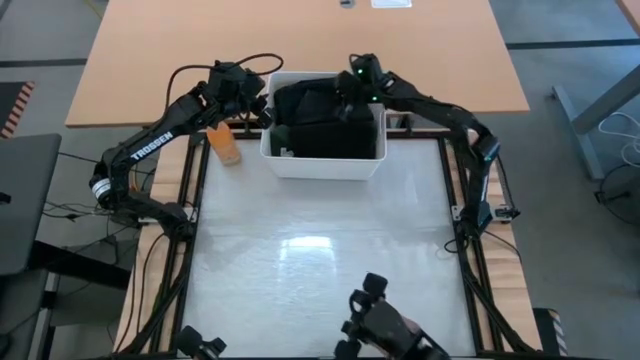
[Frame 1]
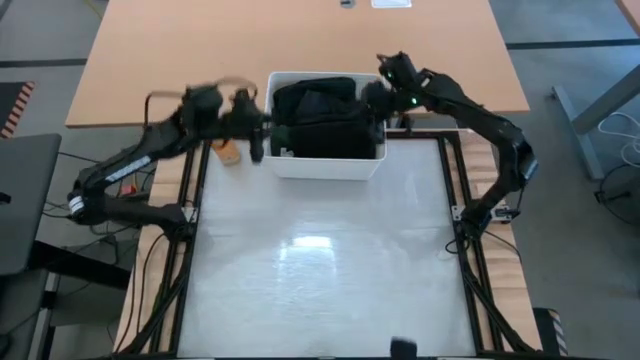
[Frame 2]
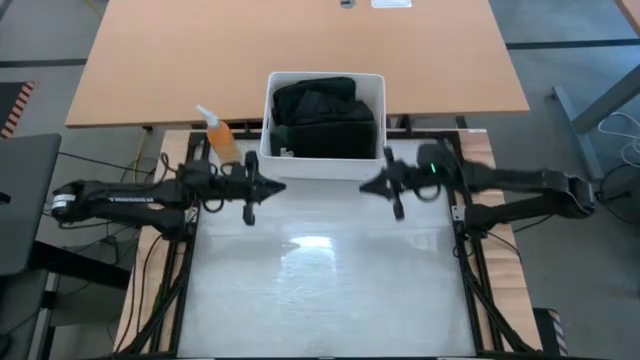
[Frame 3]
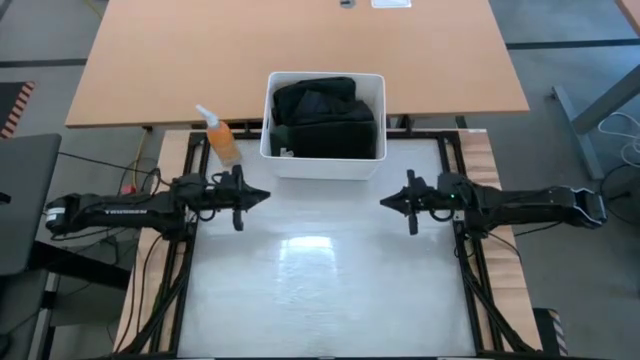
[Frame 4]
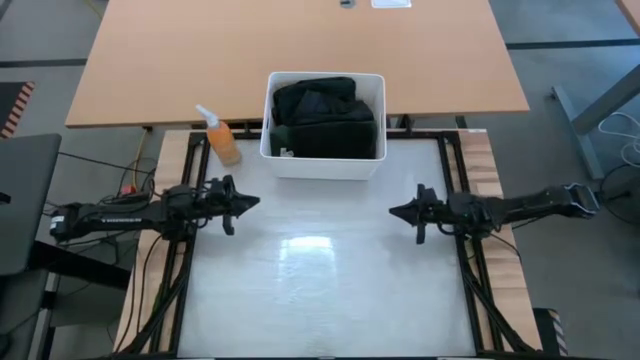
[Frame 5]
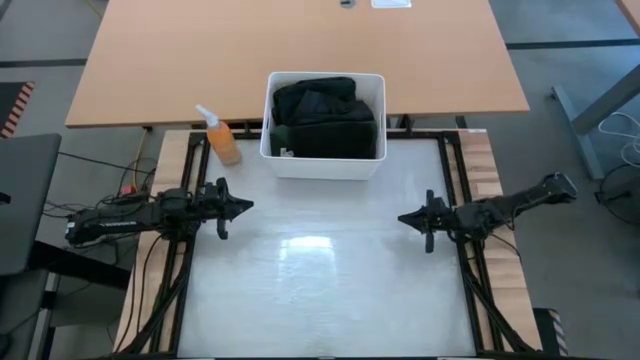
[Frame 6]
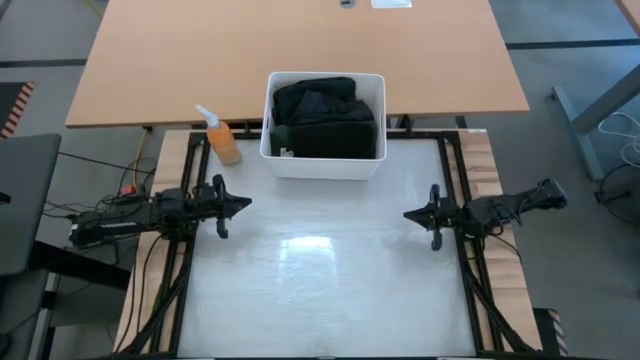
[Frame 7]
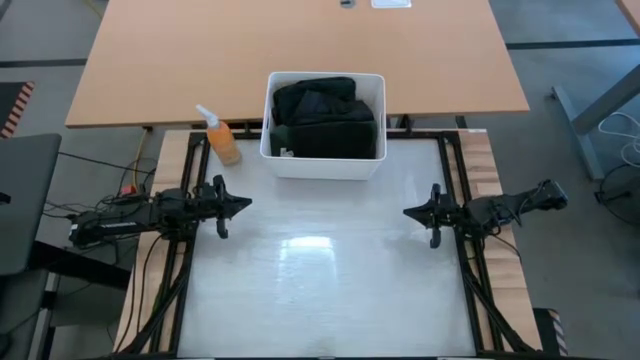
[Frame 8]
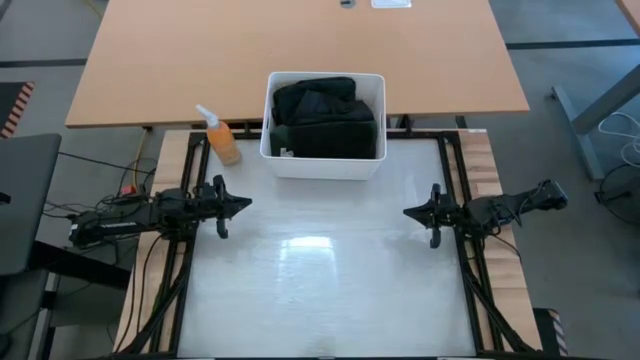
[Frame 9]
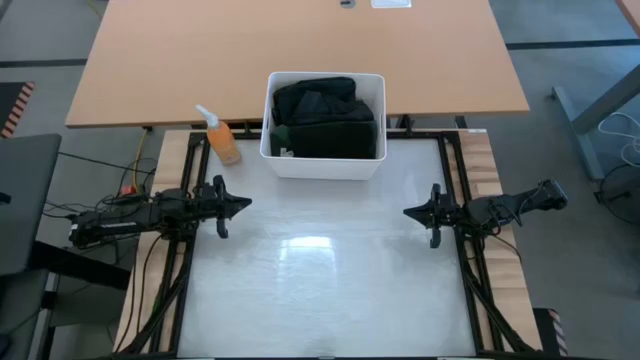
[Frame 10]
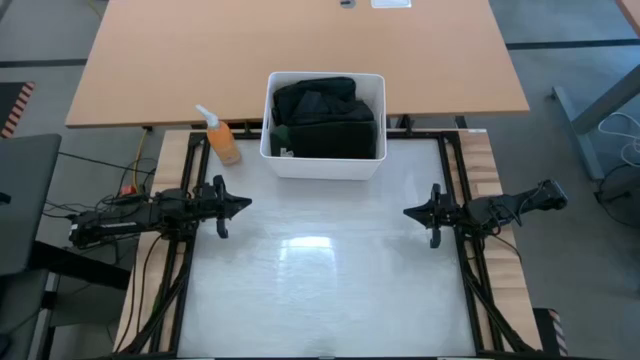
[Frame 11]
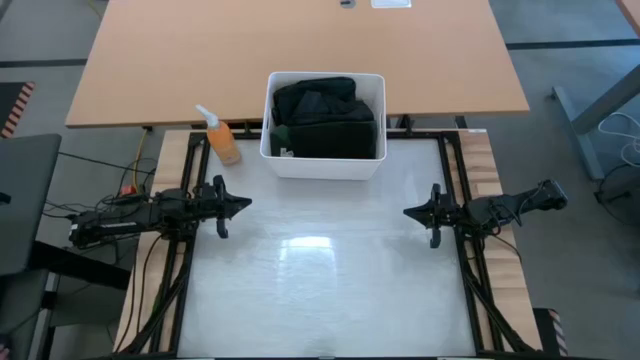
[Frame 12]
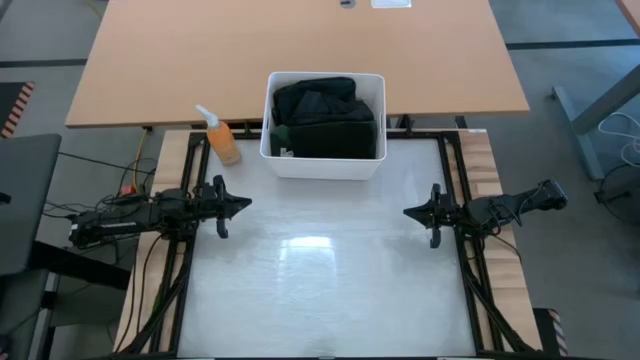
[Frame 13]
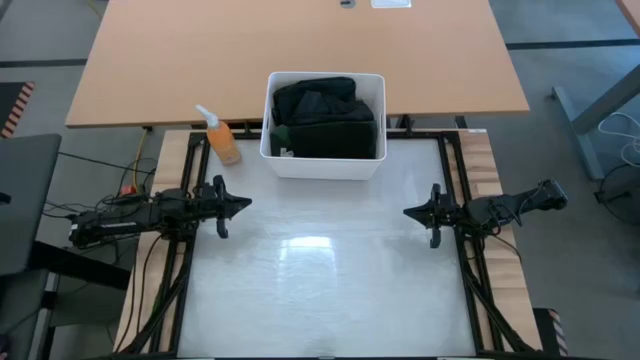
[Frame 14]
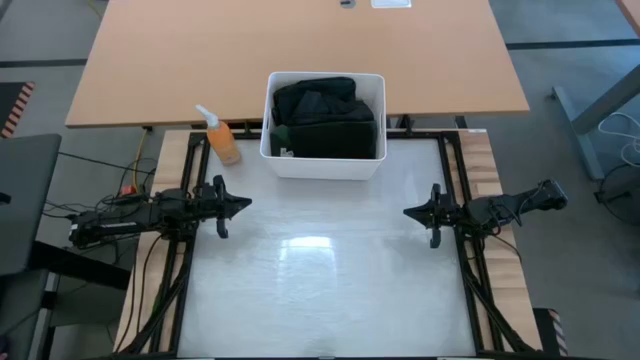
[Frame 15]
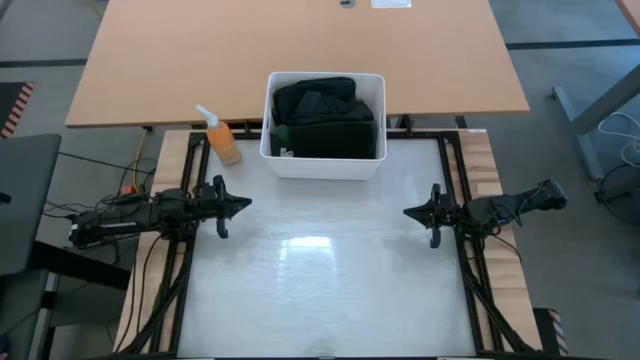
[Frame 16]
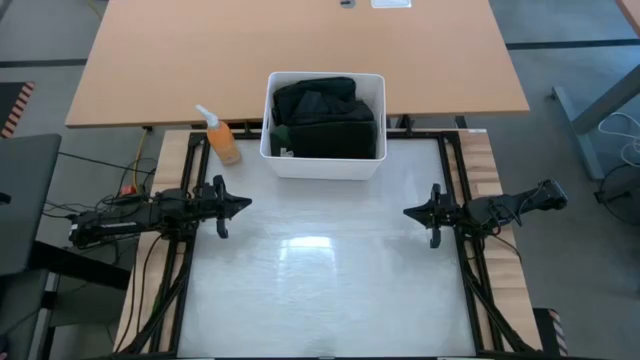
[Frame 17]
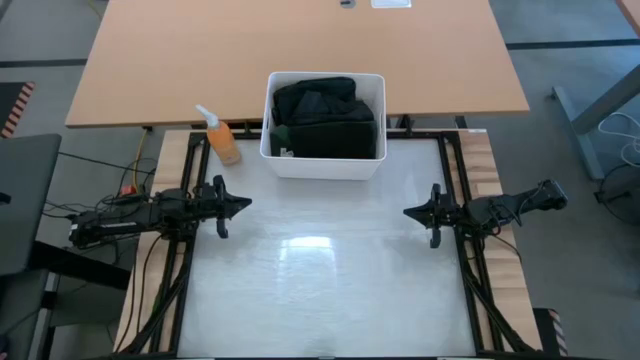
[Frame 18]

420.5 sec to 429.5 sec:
Task: Fold laundry
Return to Home Position

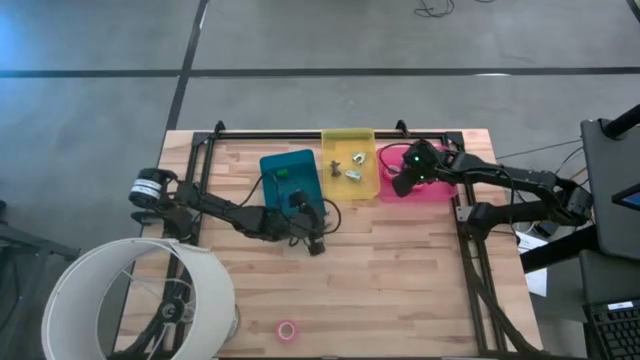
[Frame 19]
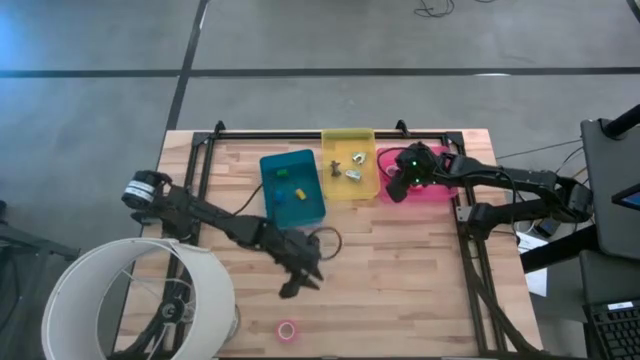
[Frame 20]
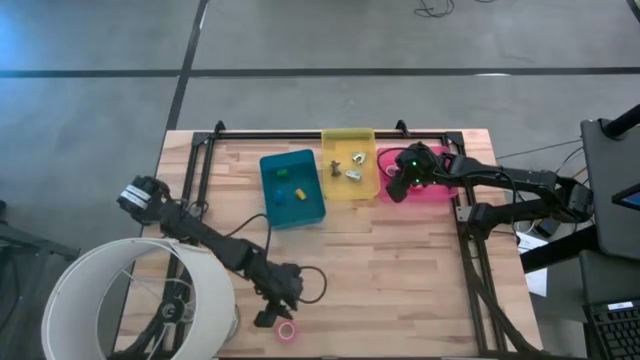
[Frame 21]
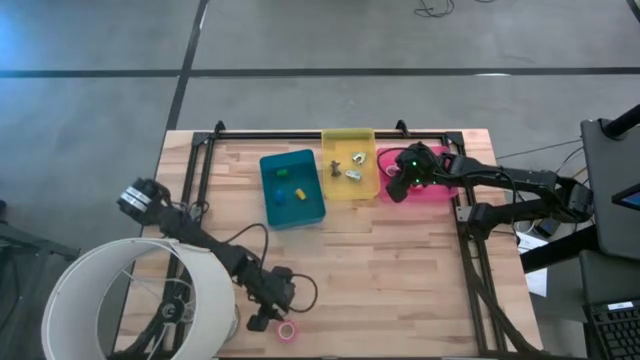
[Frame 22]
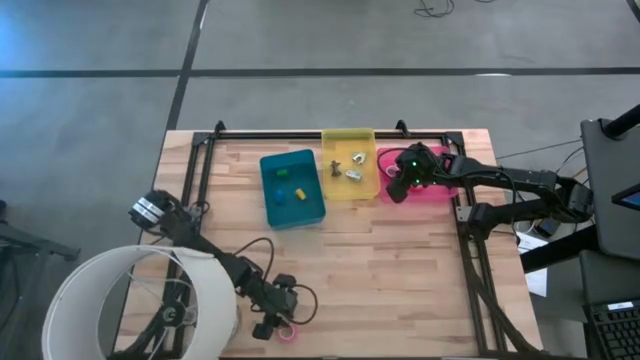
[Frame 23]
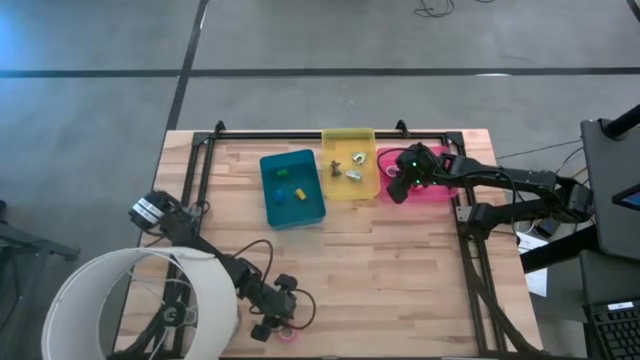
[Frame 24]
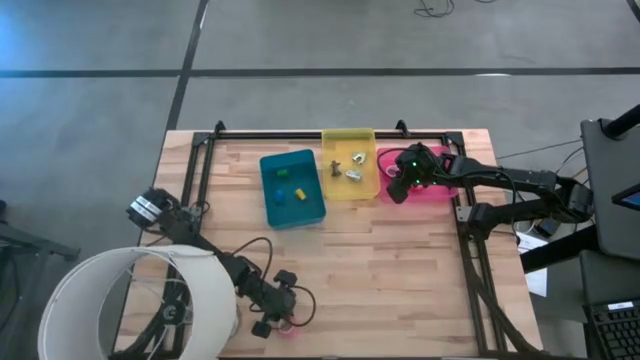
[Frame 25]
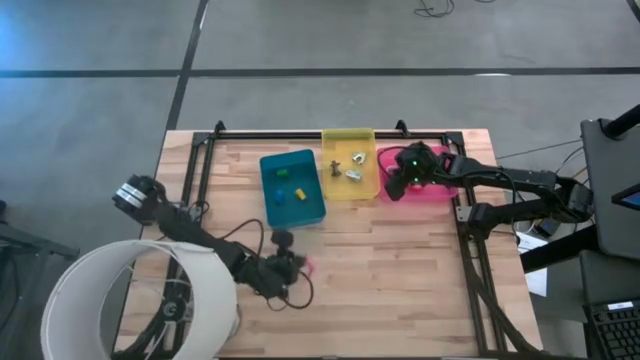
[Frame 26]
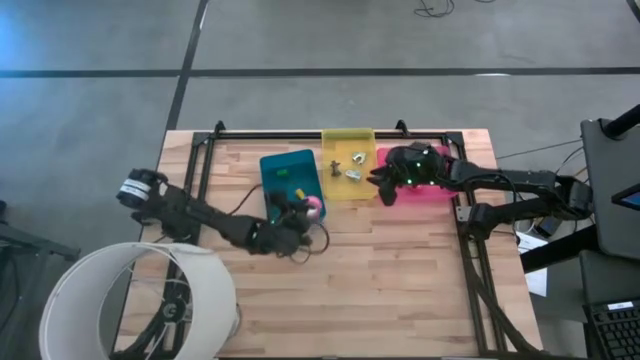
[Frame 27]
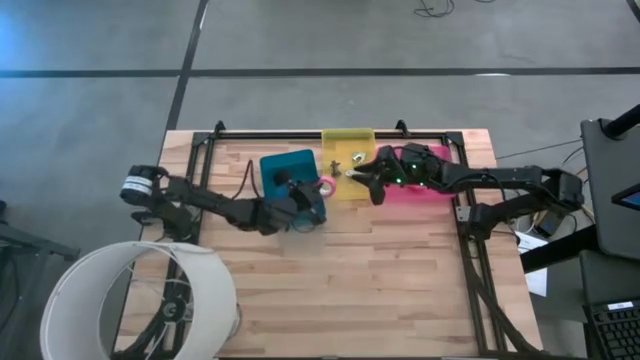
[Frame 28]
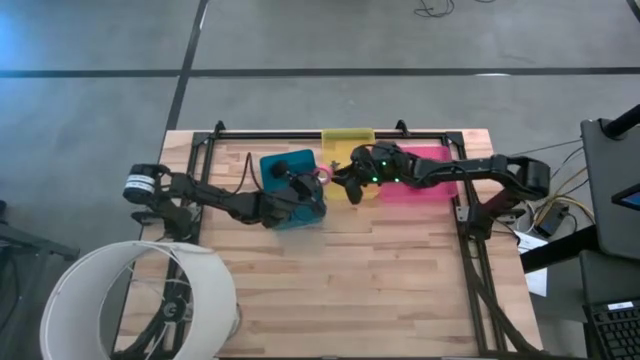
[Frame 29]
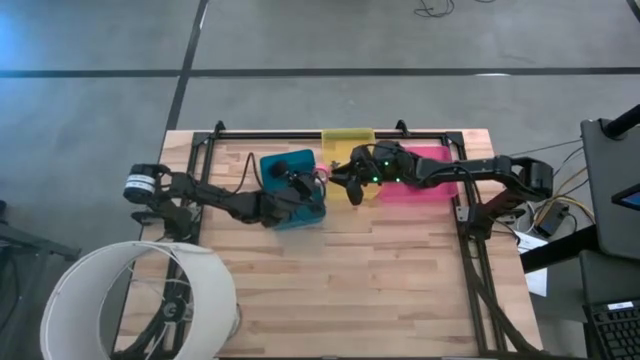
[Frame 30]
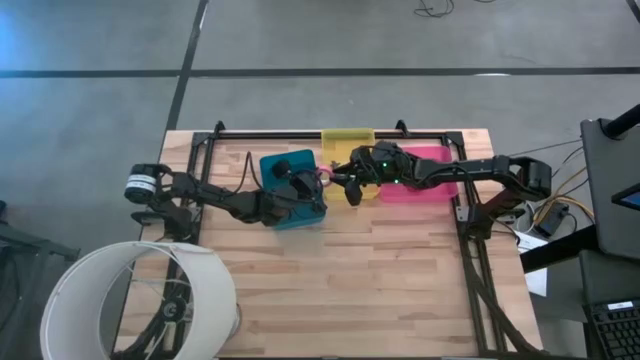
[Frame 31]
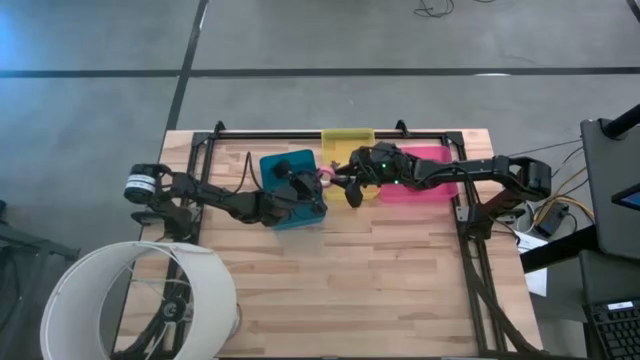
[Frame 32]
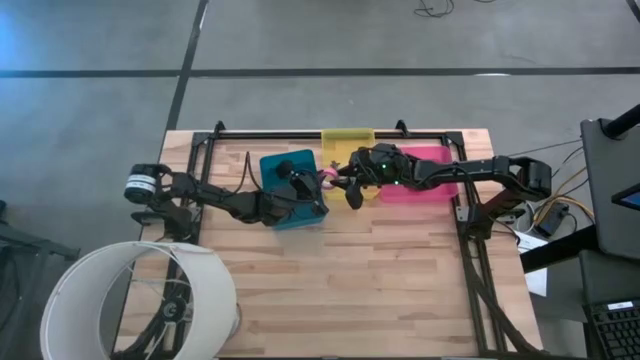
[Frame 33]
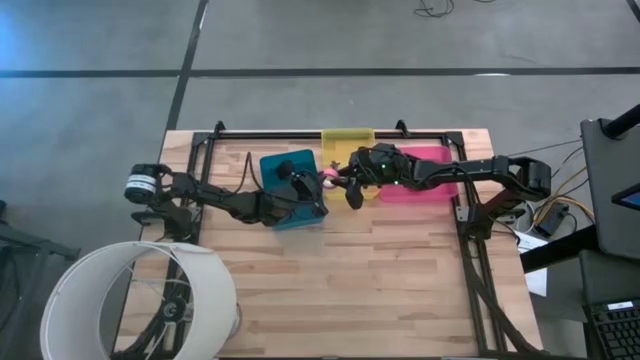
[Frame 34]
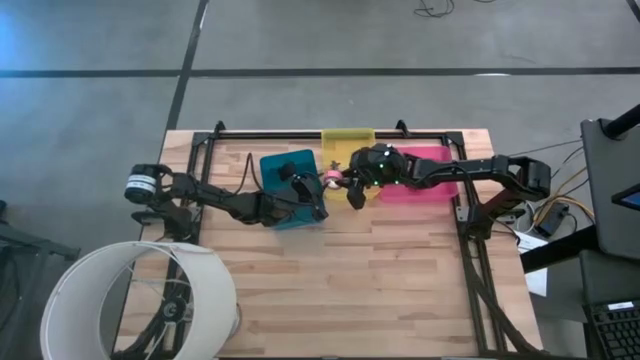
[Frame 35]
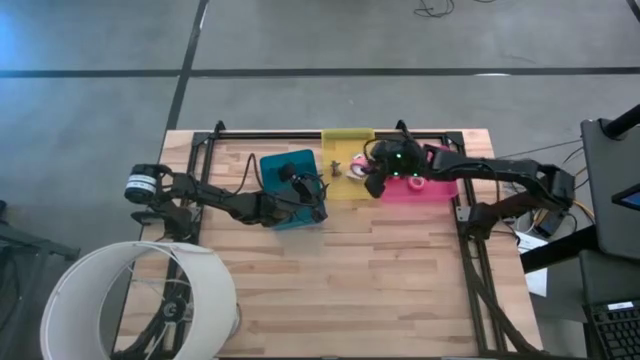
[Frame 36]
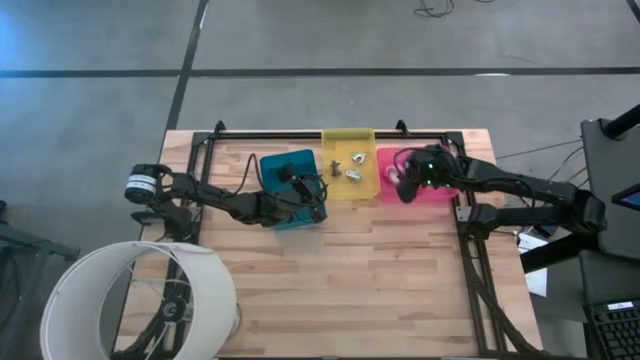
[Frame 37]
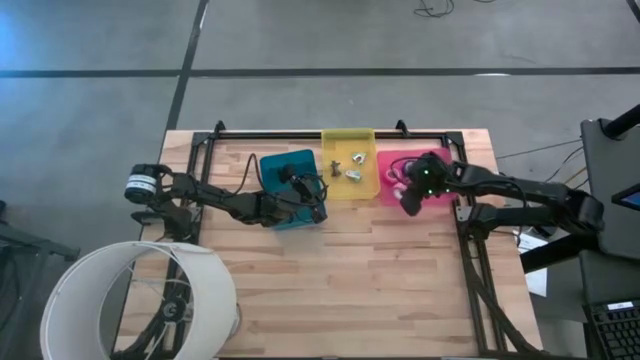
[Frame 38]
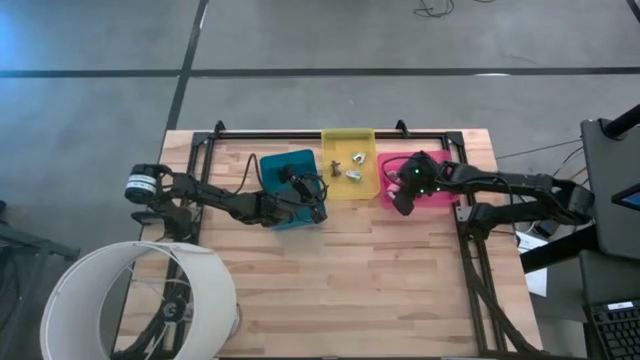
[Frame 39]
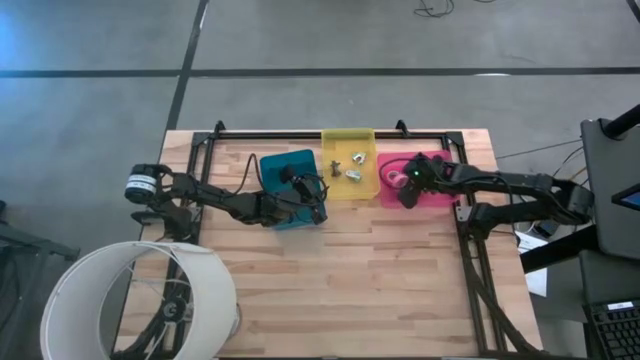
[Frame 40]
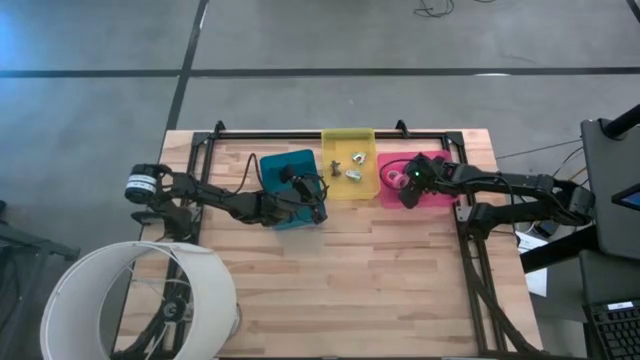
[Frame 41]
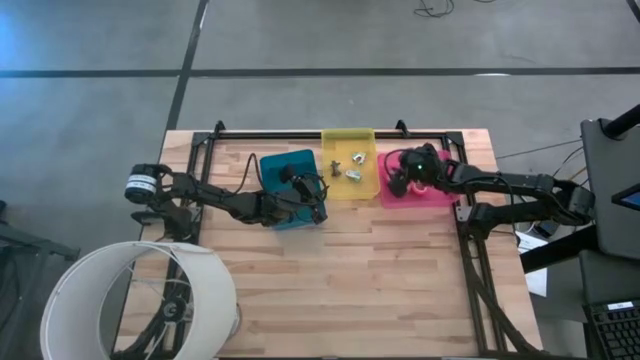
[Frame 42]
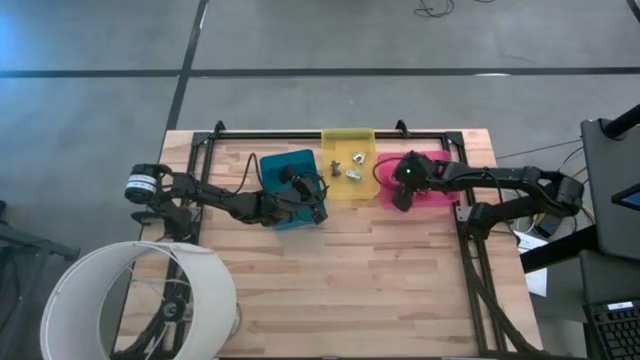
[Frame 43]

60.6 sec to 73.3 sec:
Task: Pick and place Stapler, Stapler remover, tape
Put the pink tape into the red bin

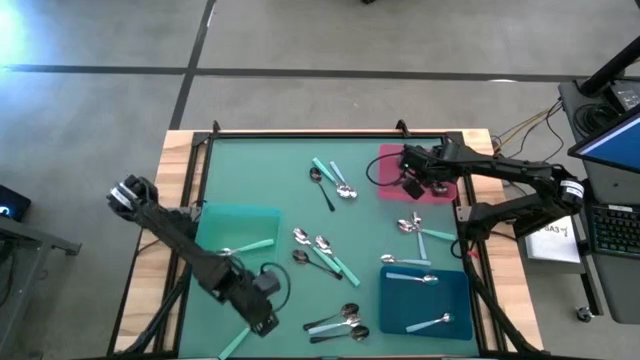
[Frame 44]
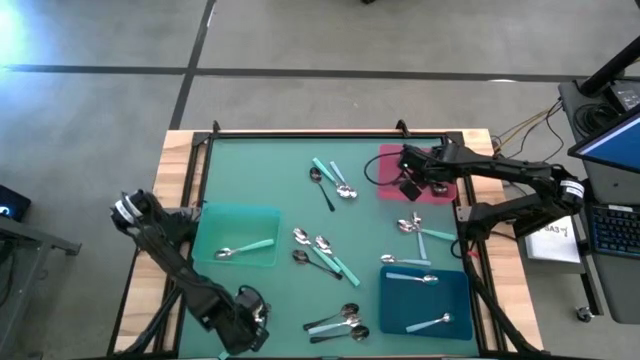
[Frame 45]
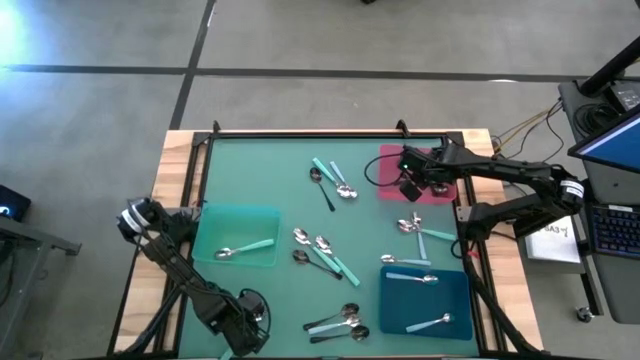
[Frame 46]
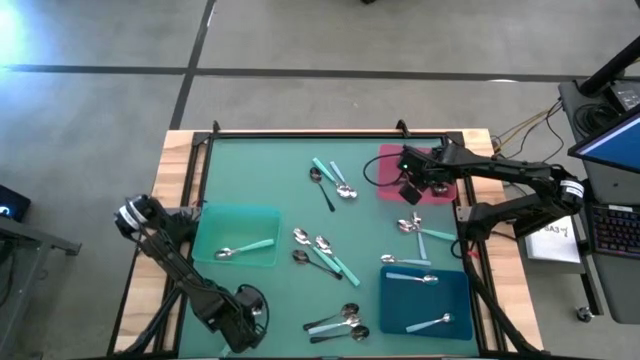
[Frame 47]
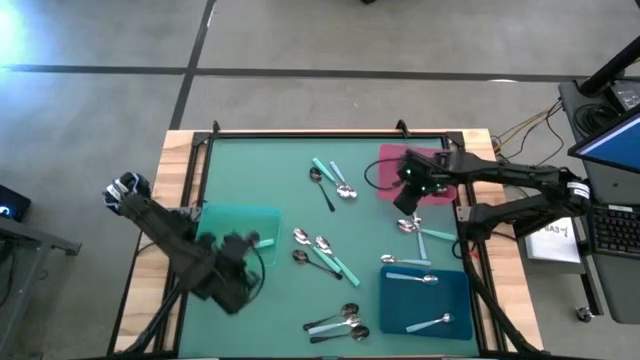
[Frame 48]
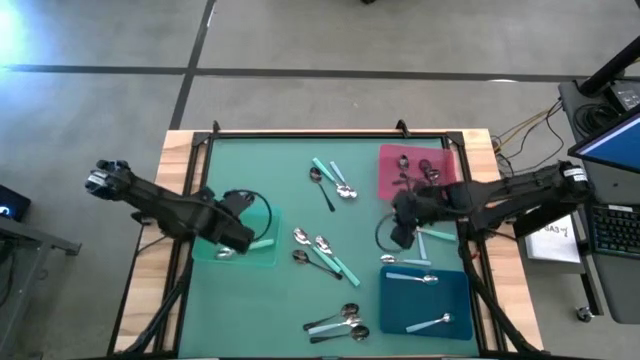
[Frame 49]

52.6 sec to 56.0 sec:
Task: Sort silverware by color (type)
Put the green spoon into the green bin
